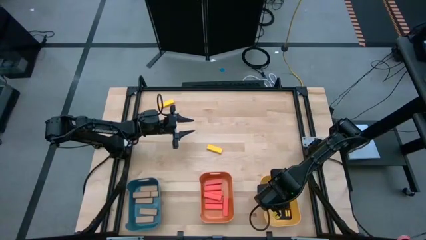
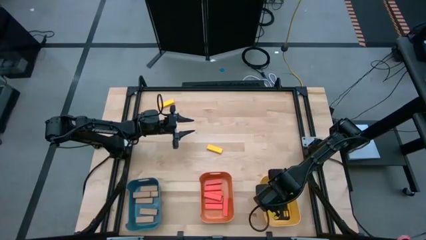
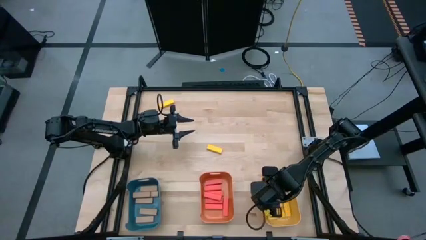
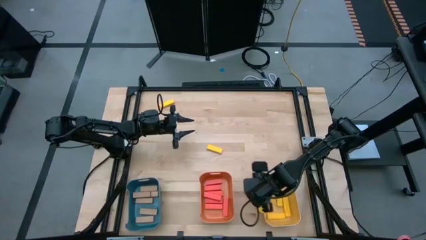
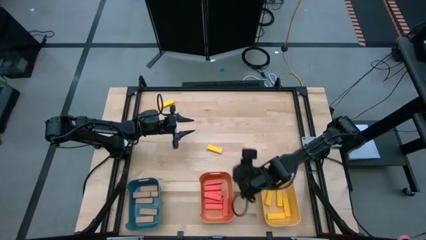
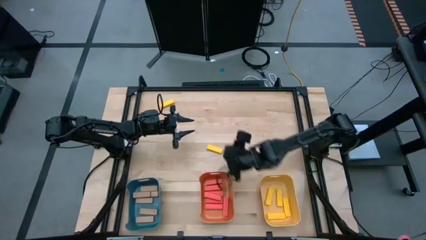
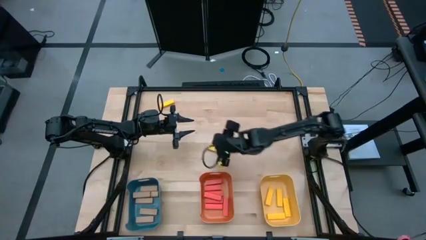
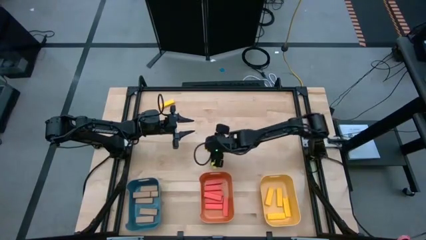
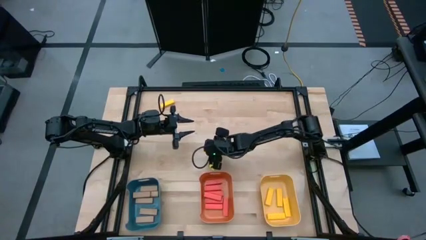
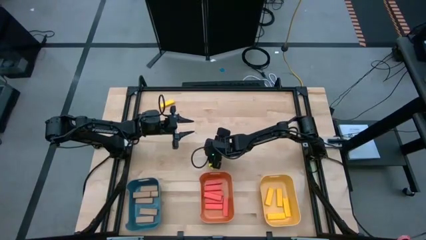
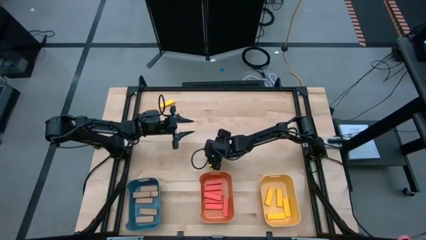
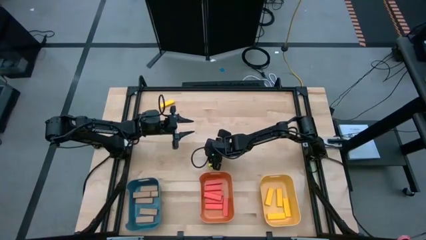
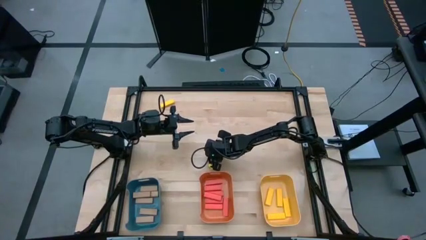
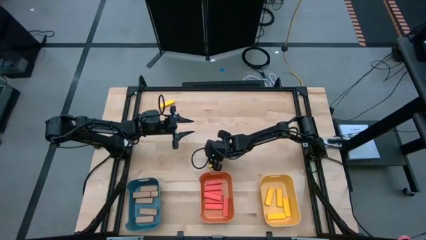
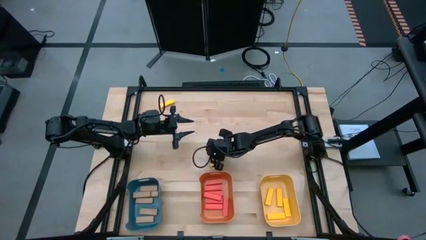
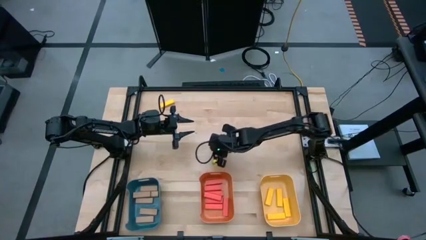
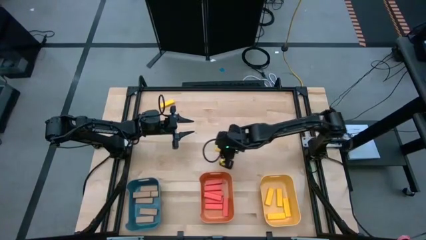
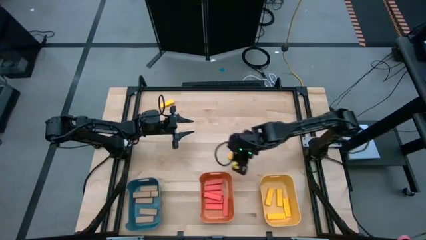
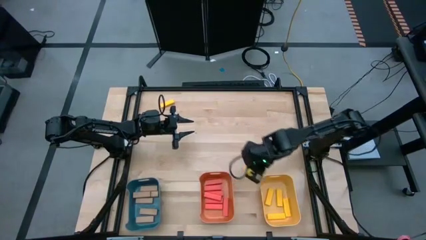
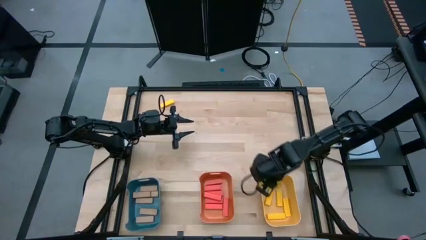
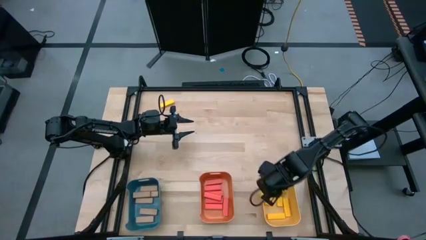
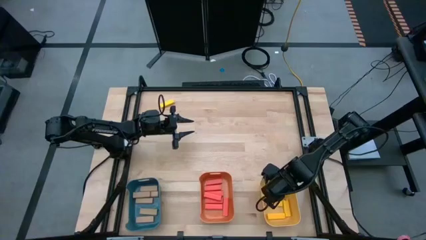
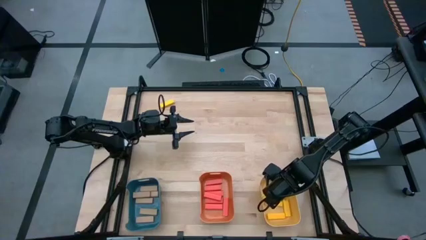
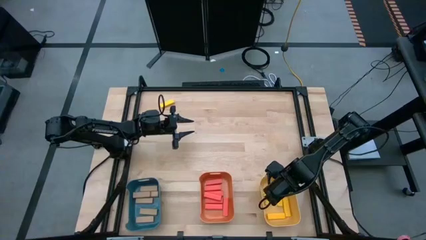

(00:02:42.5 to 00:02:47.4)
Task: Sort blocks
Put the bottom right yellow block into the yellow bin

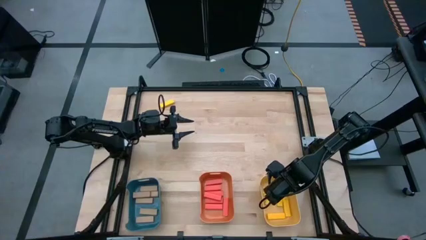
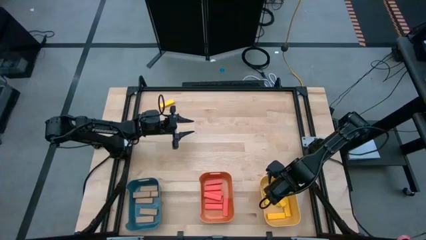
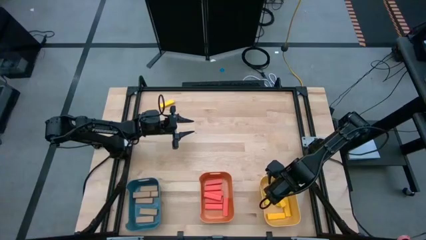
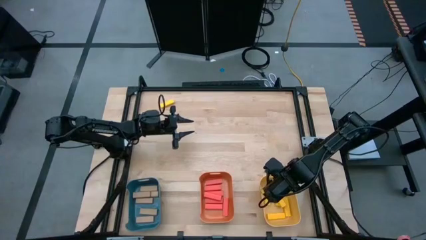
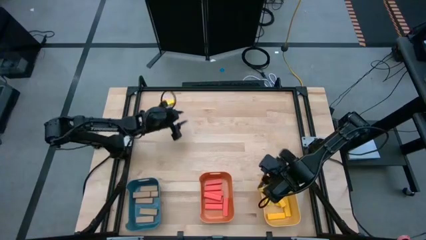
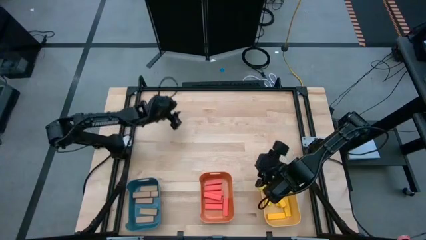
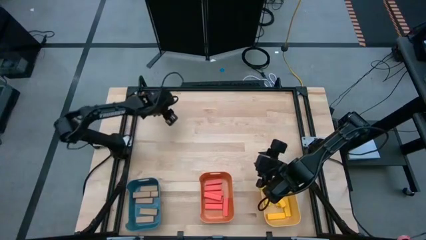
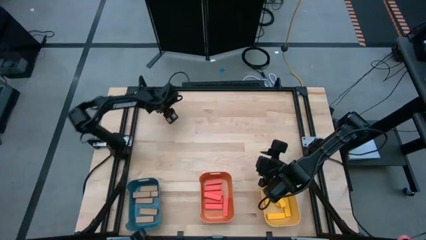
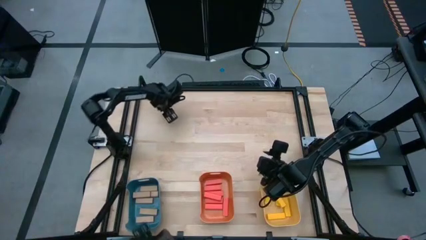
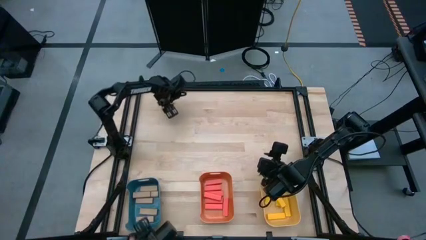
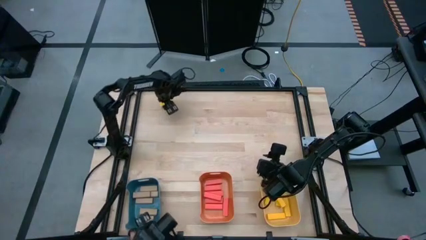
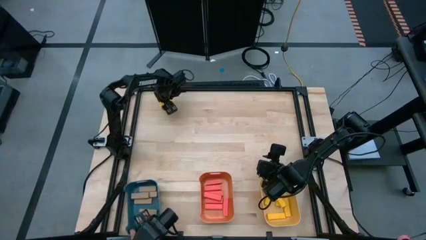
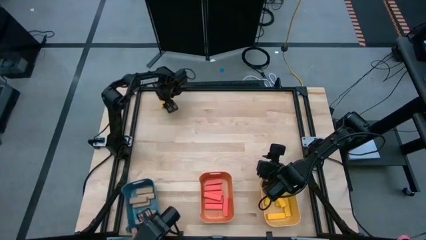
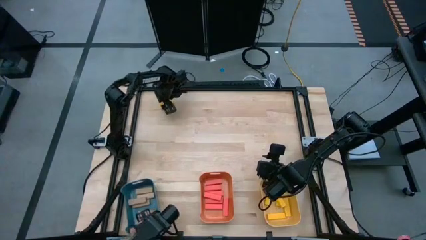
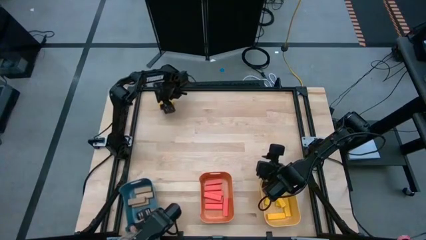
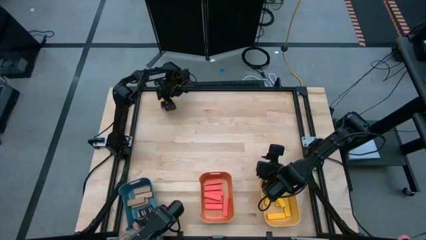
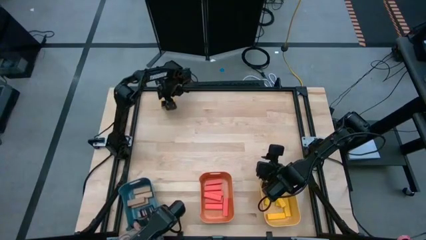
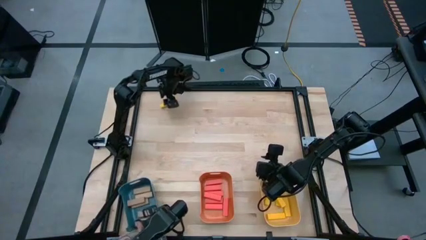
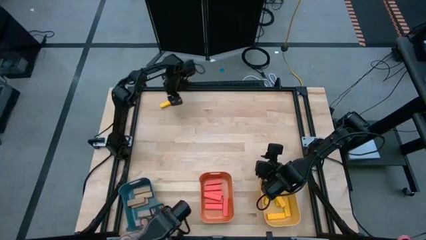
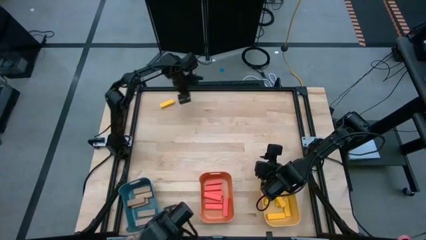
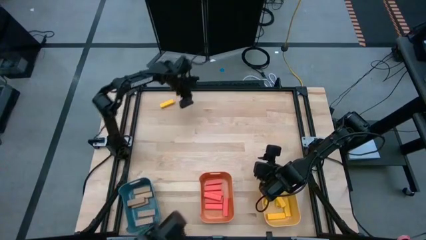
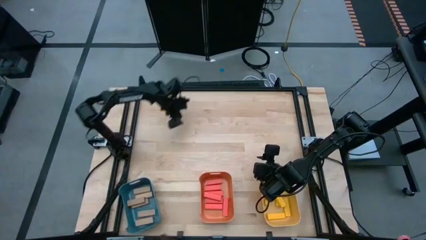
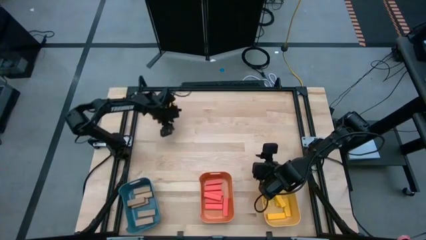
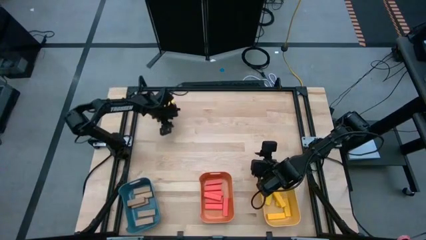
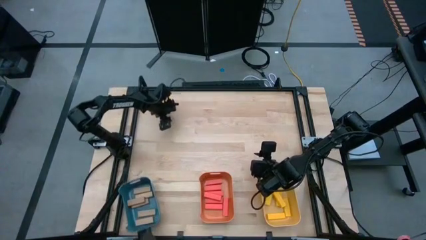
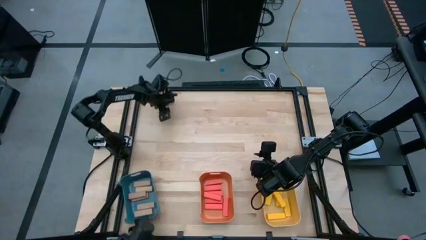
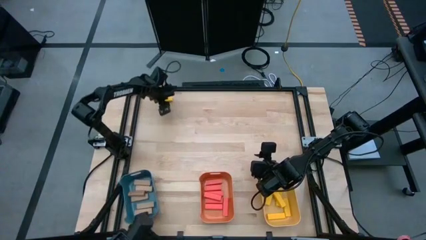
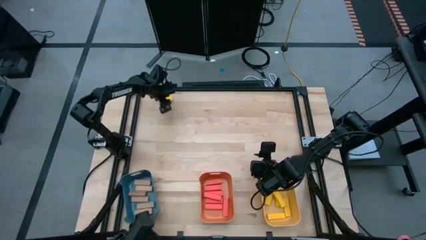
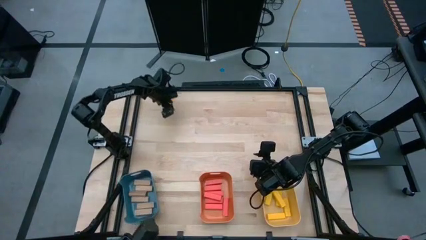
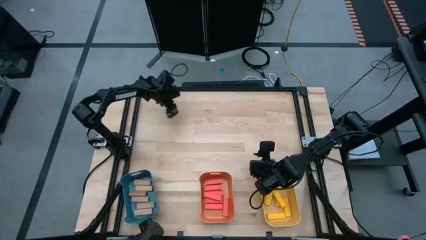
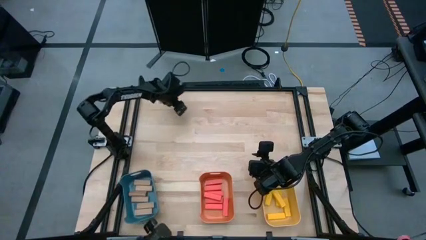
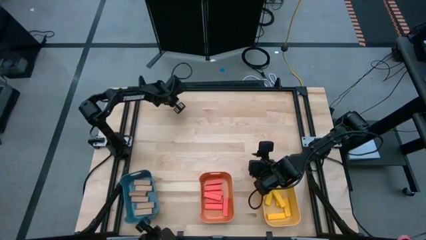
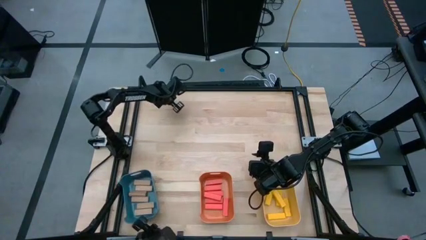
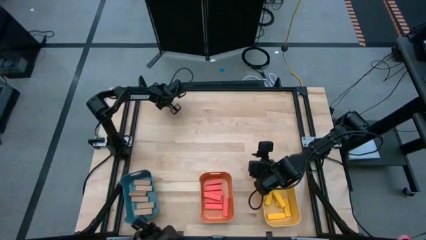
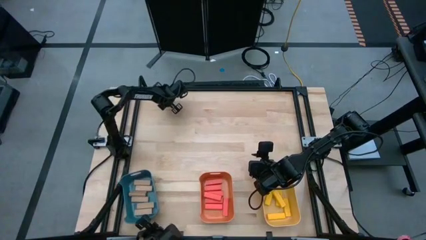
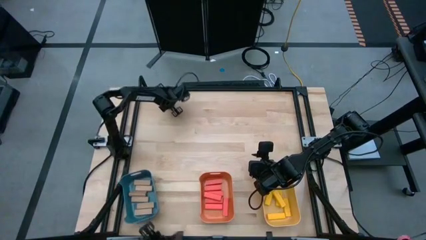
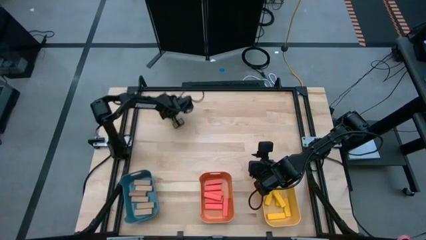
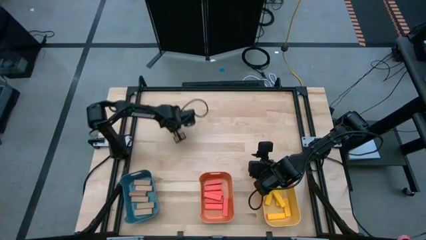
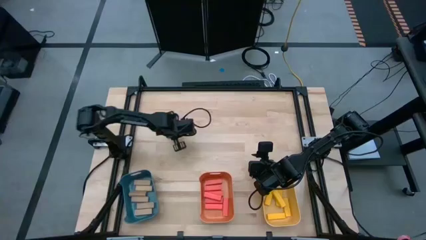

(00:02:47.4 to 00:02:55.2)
Adjust the top left yellow block

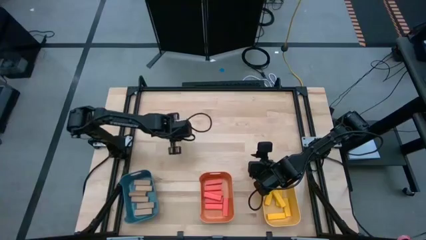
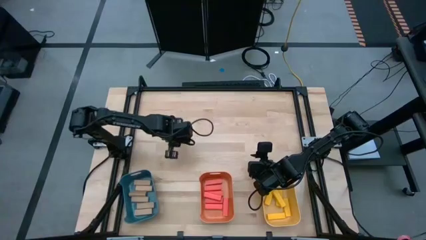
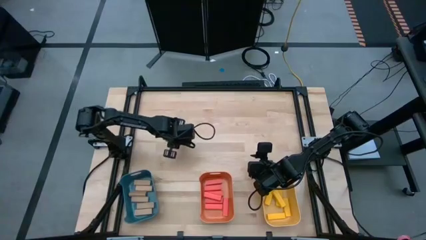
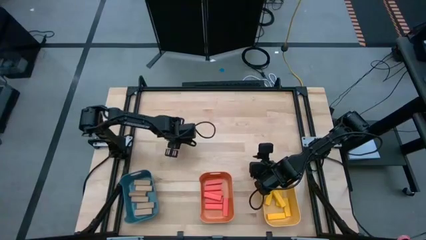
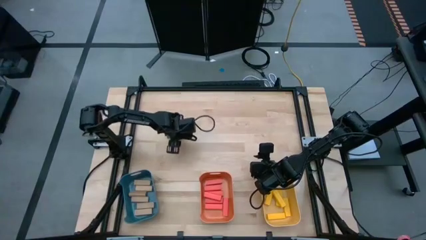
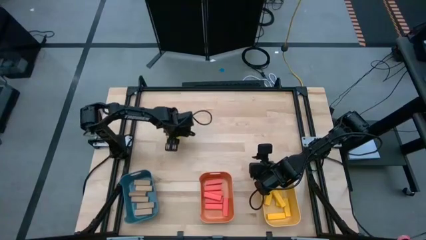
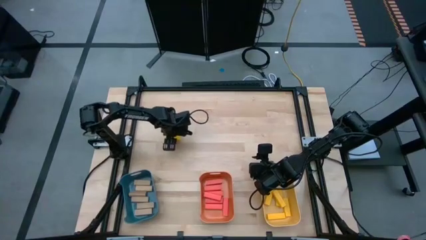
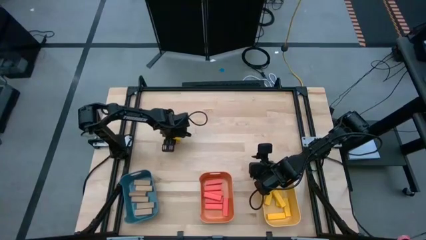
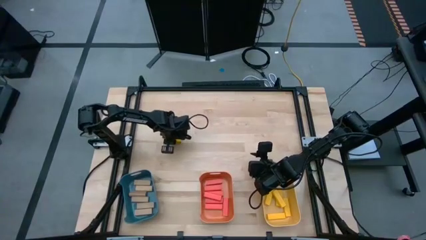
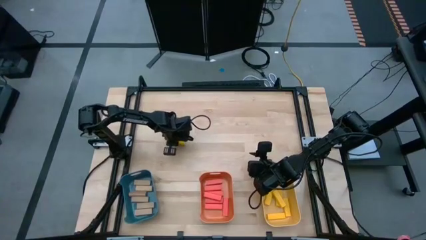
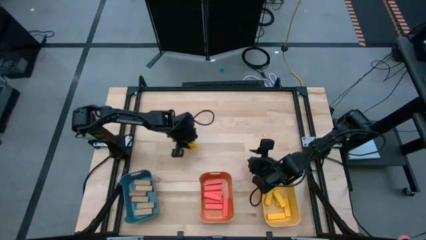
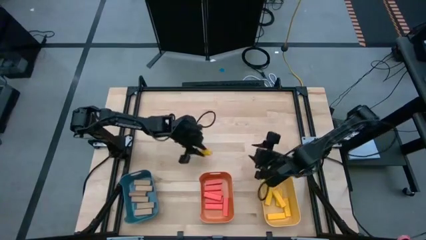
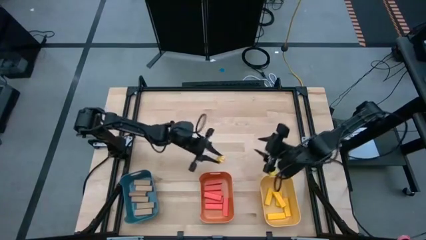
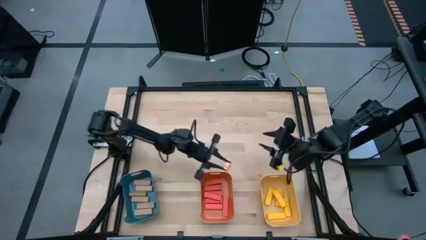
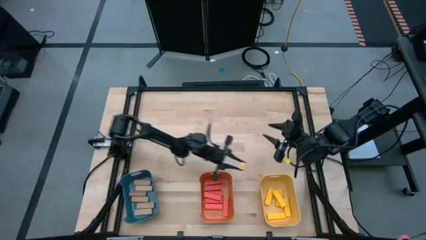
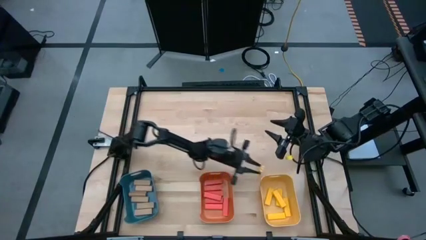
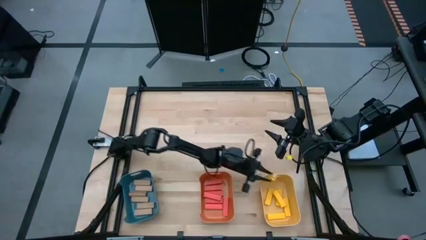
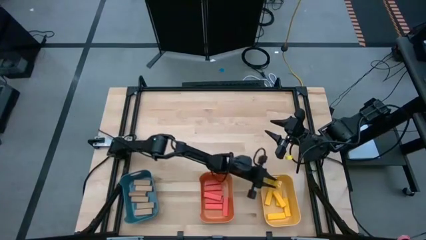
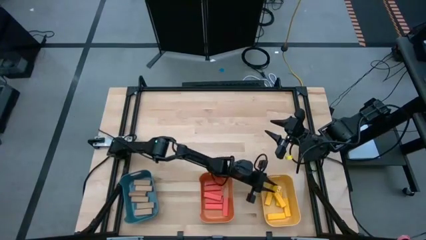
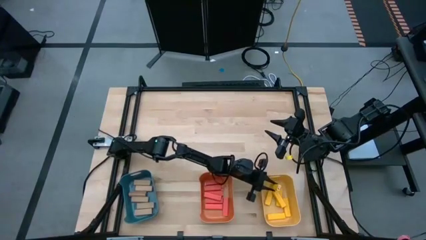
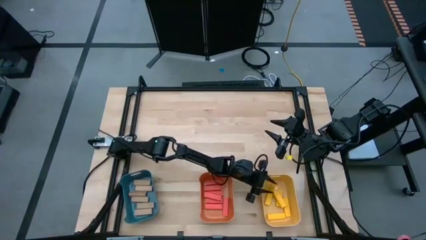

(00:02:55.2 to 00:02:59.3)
Put the left yellow block into the yellow bin
